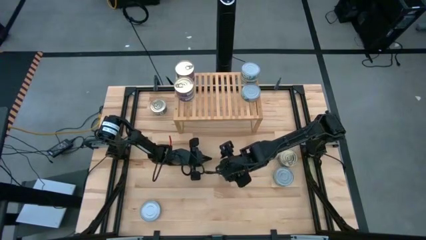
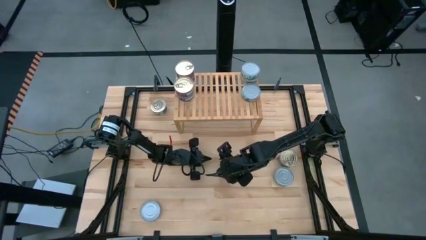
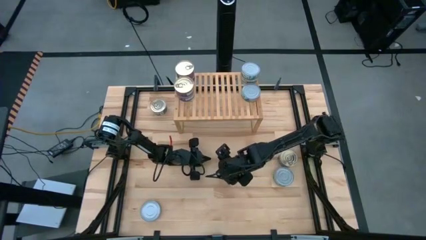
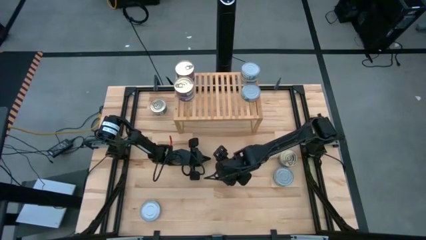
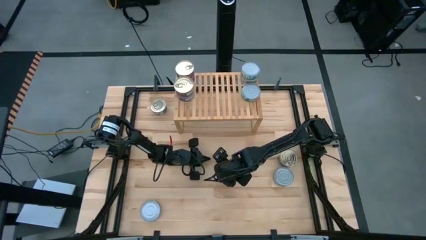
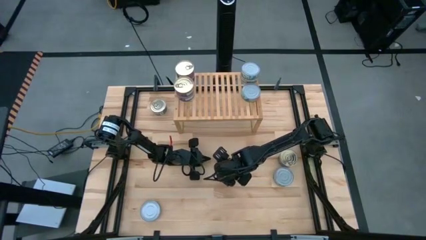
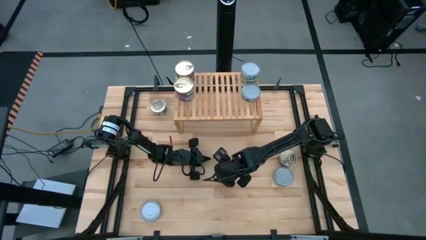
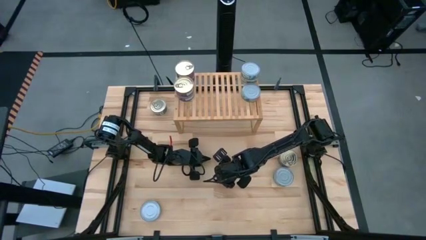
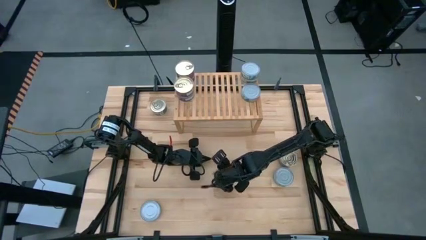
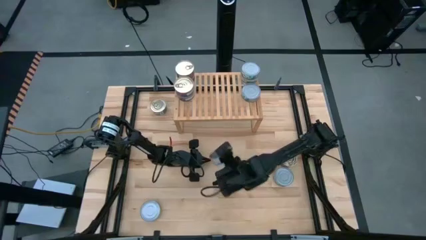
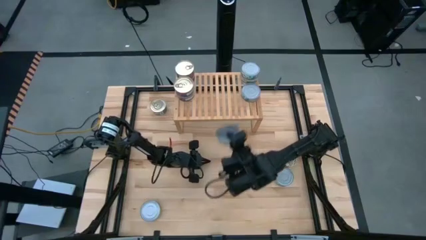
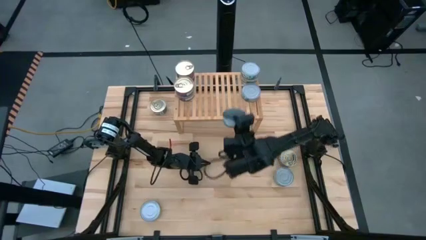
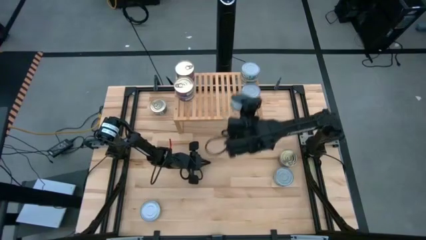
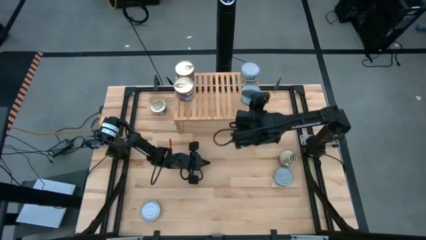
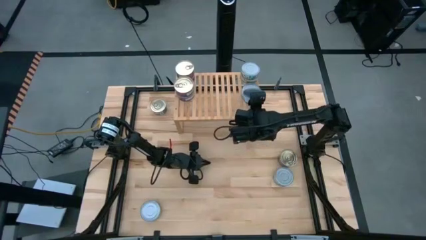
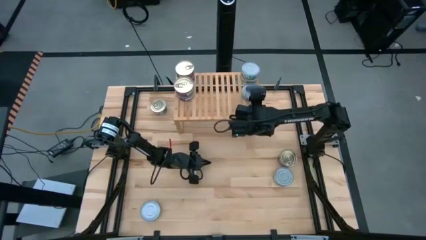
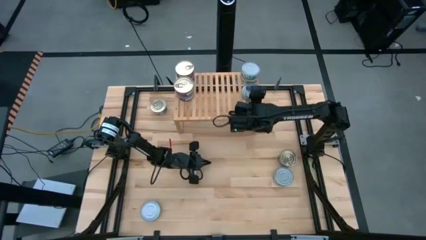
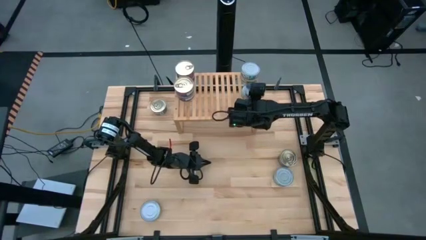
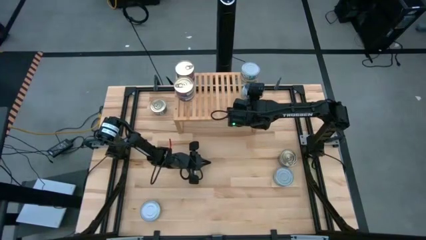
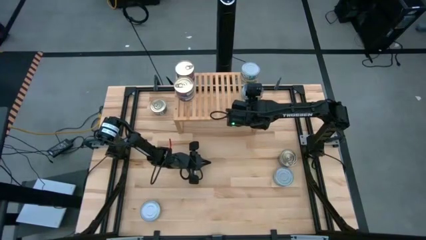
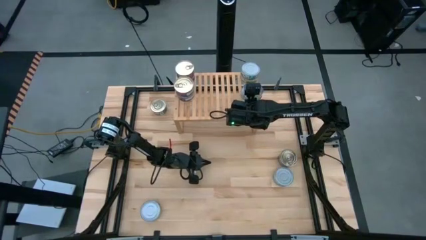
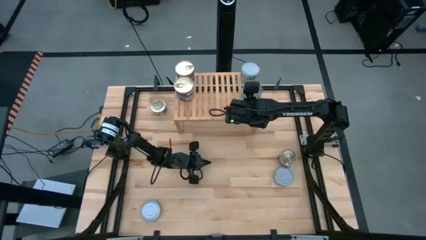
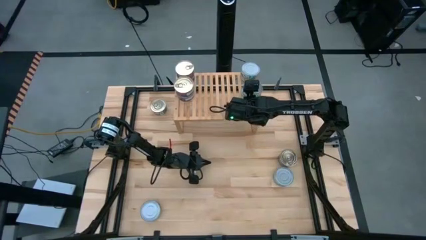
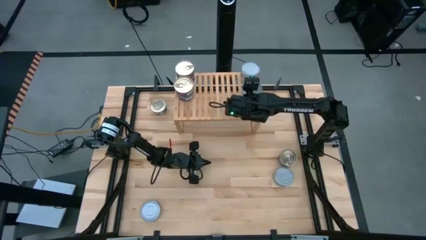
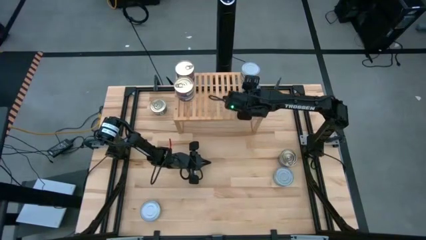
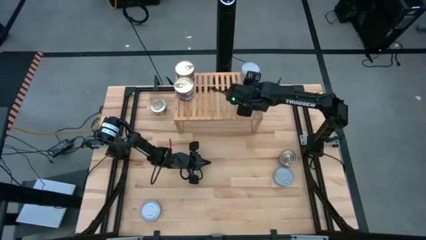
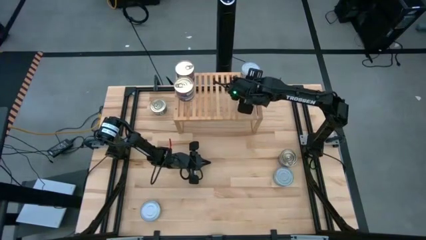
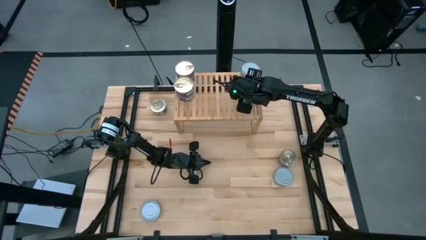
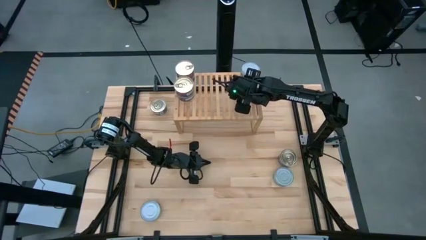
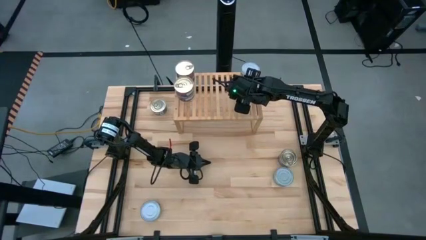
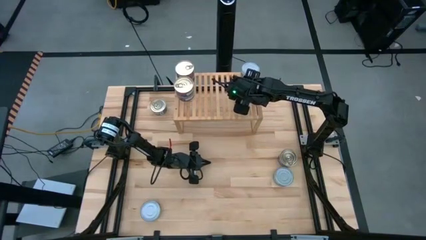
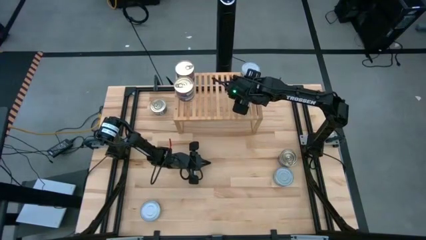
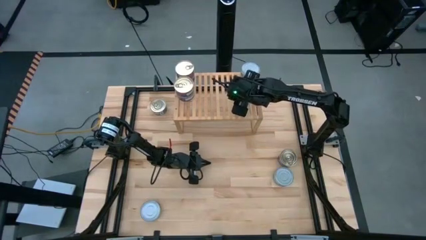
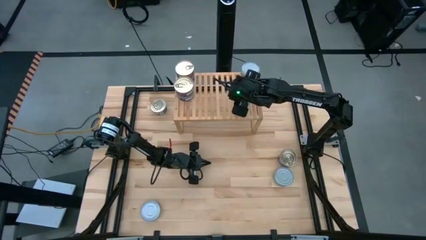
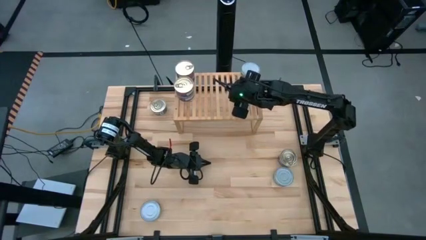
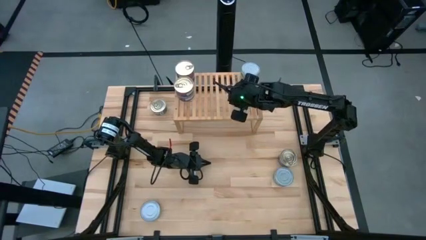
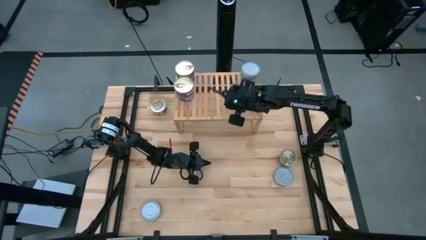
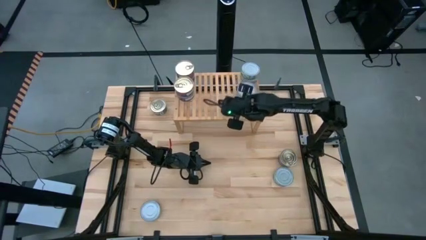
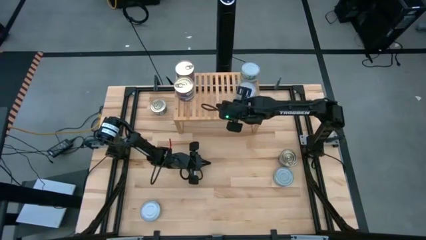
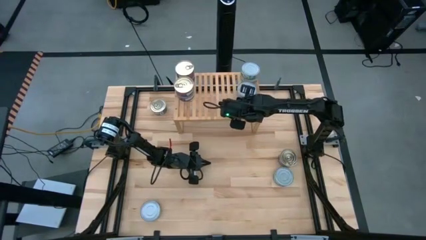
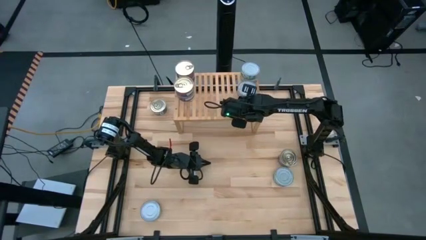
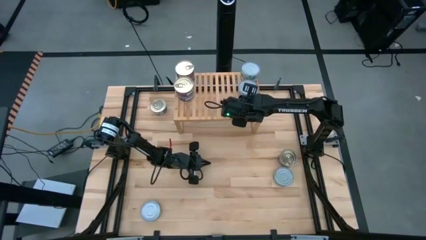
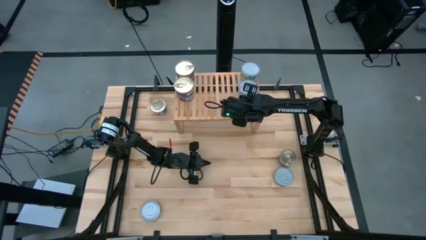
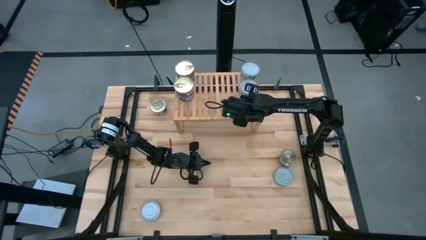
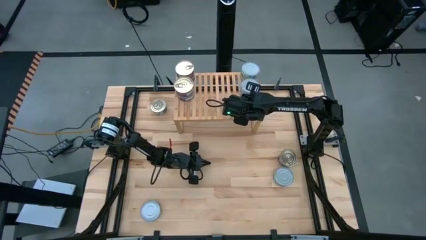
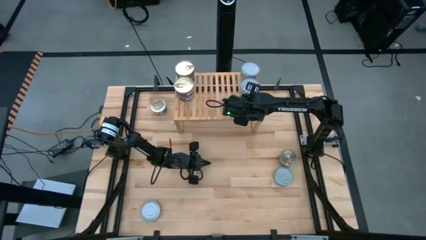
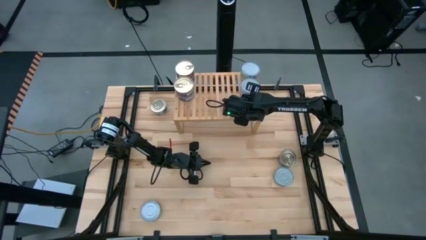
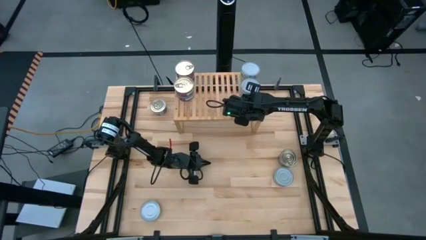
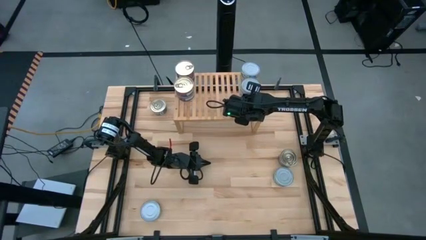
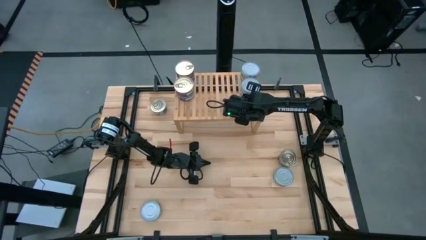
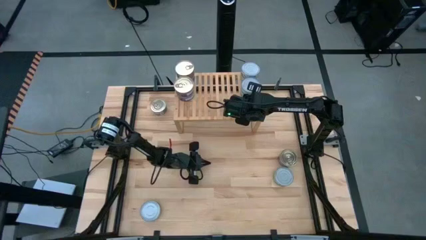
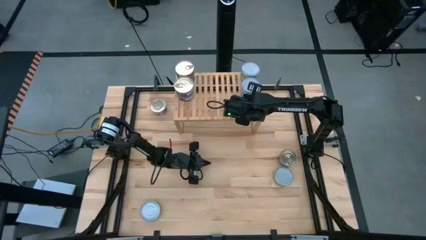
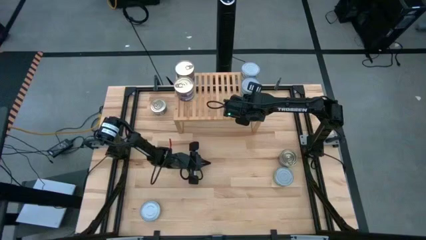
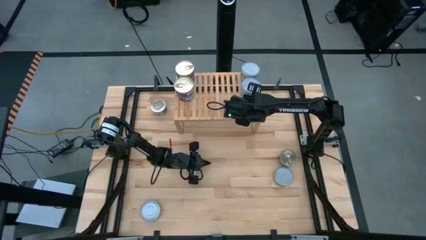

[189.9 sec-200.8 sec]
Task: Stack canned seafood by type on shelf
Stack the green tuna can on top of the other green tuna can on the shelf

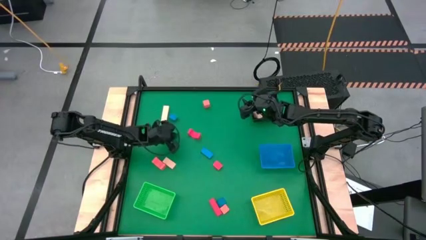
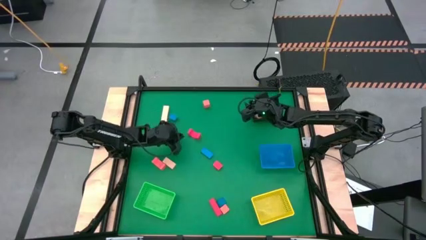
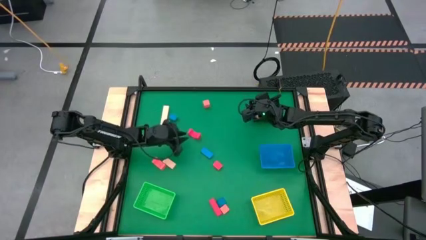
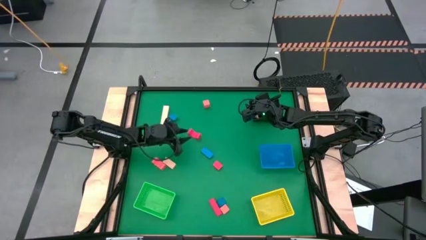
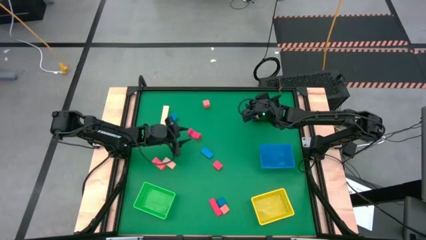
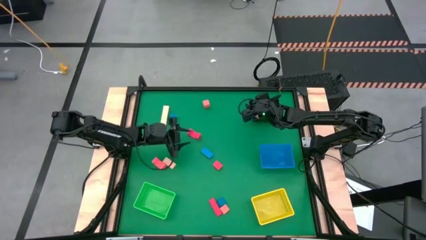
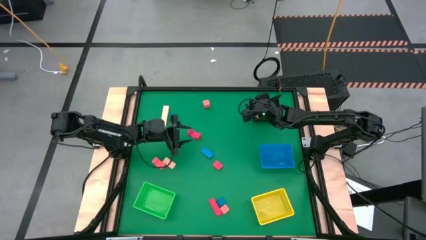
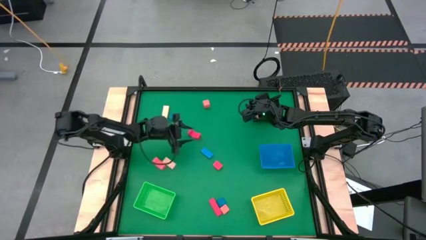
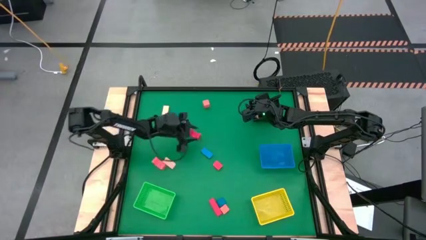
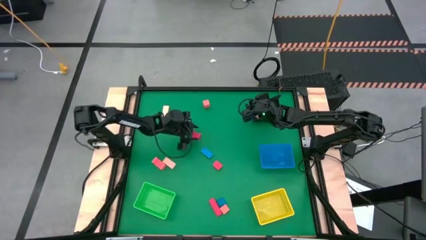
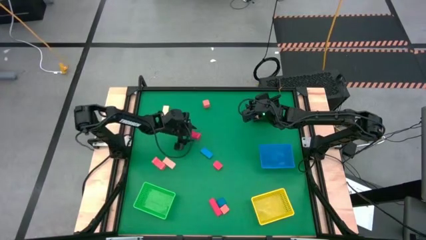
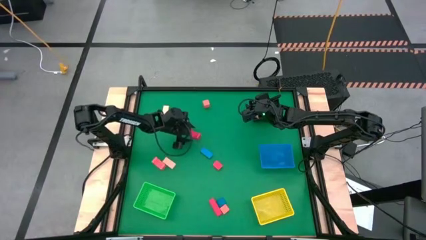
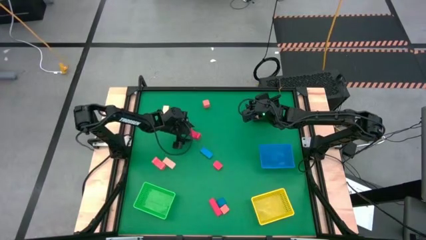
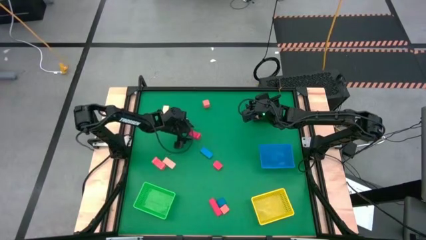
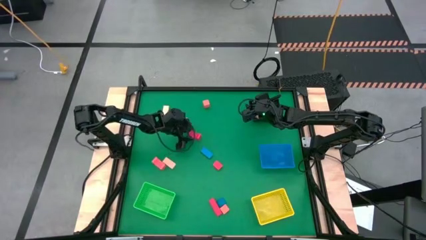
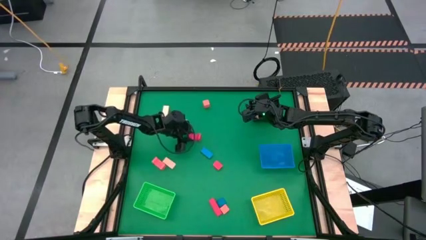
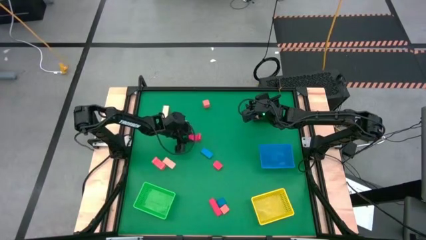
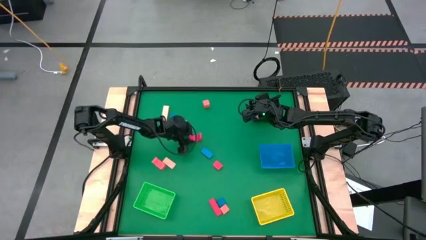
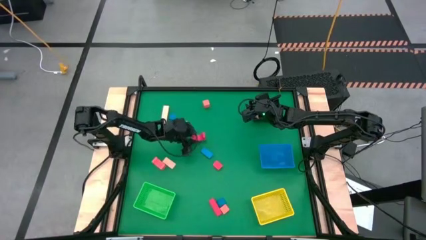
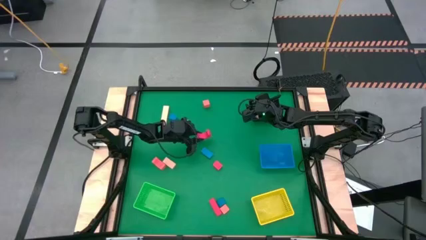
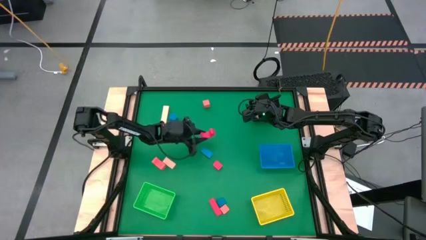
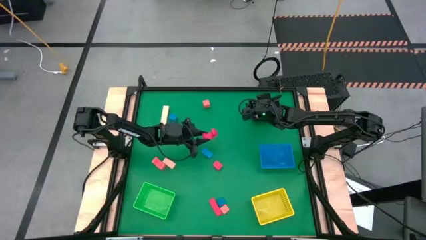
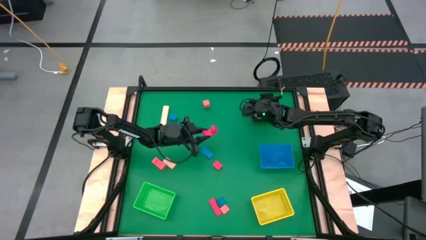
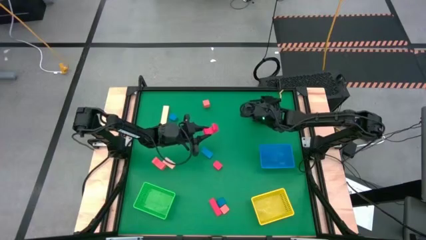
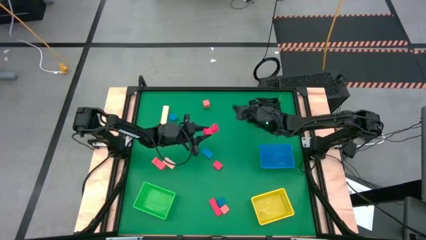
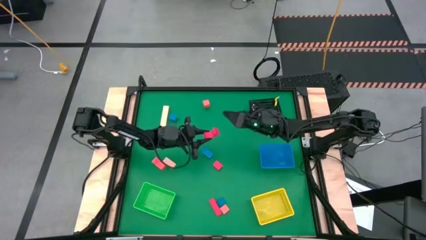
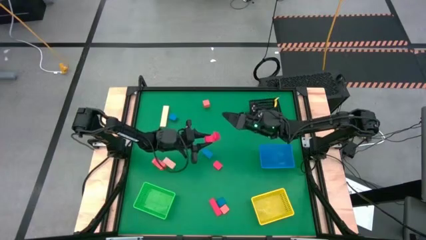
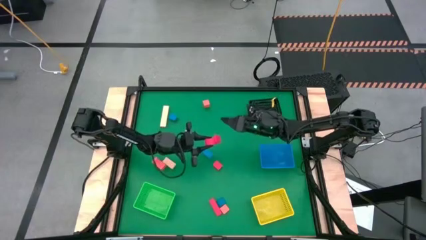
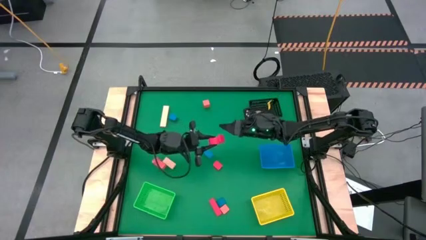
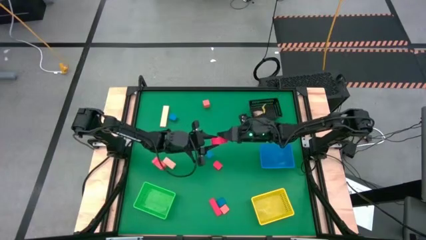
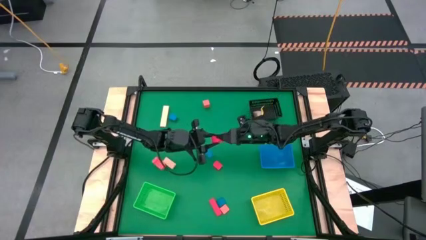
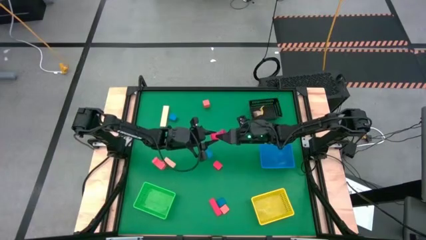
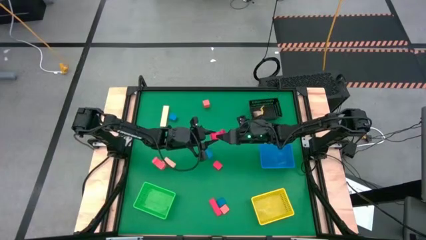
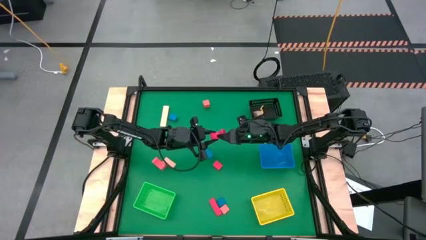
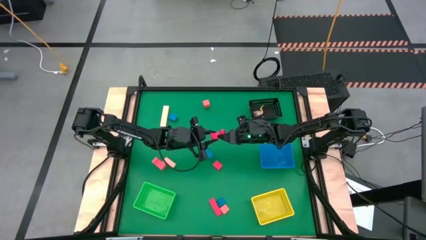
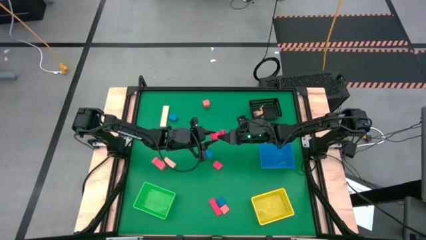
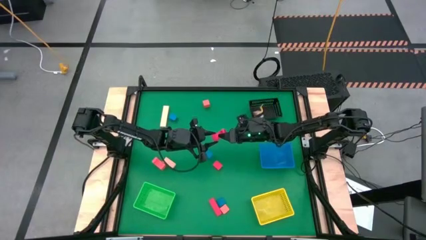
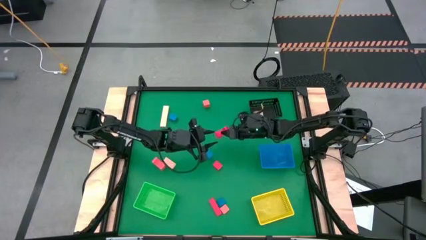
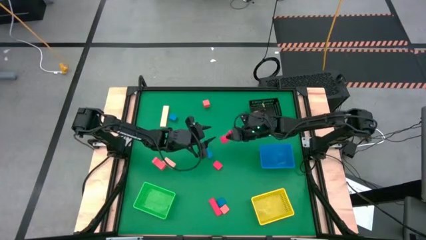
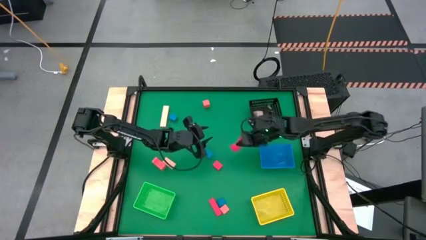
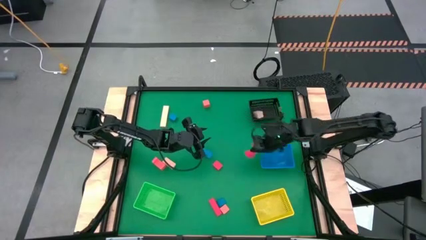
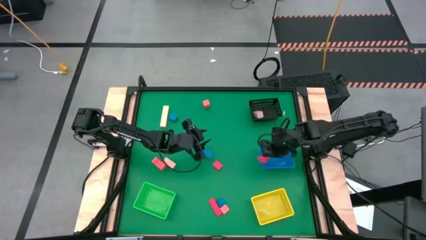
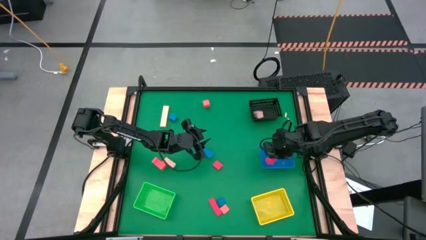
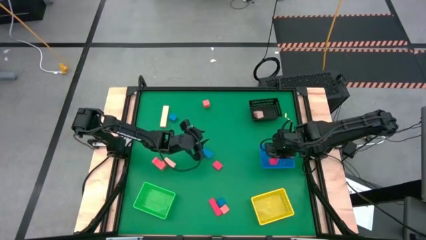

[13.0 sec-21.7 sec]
Task: Sort & place blocks by color
Put the red block into the blue bin
